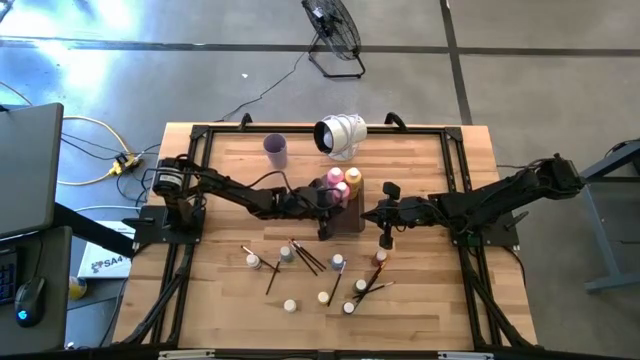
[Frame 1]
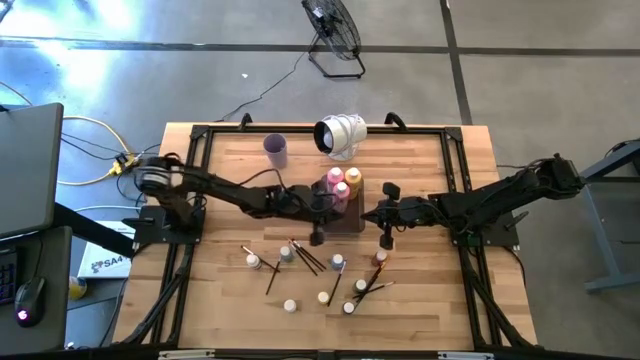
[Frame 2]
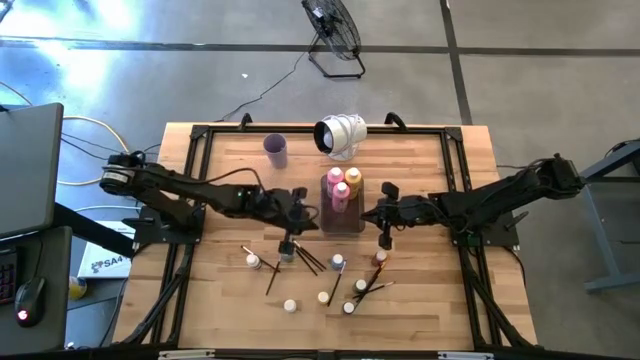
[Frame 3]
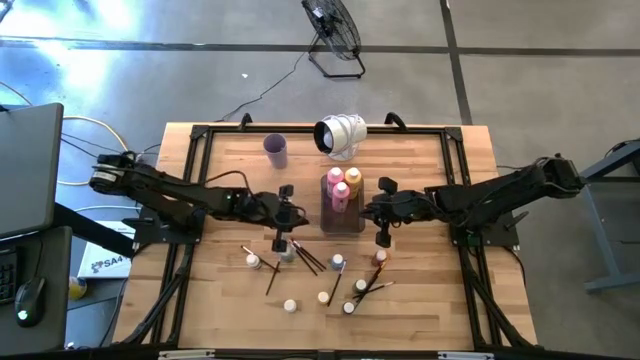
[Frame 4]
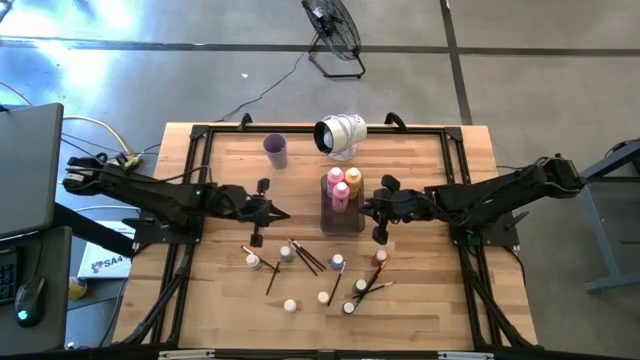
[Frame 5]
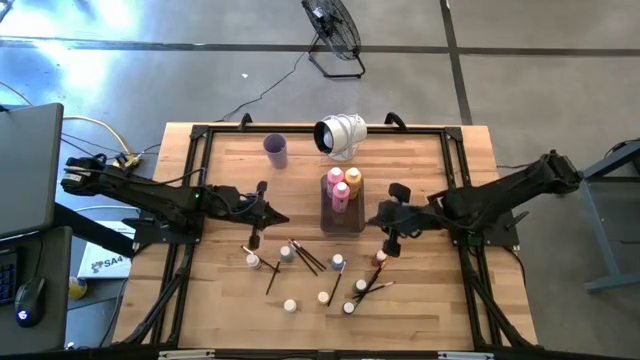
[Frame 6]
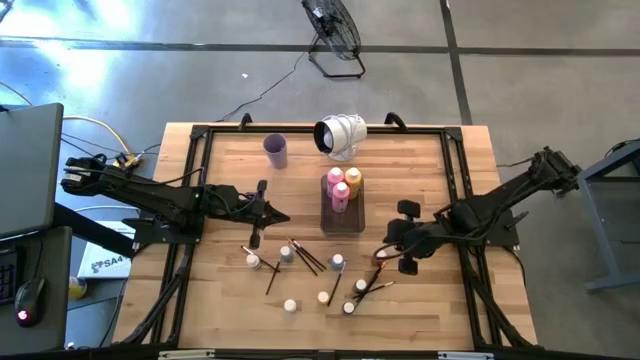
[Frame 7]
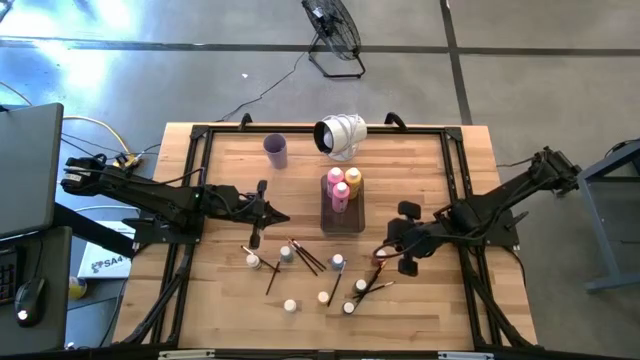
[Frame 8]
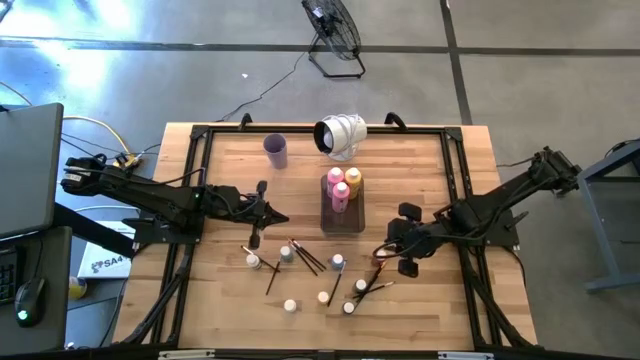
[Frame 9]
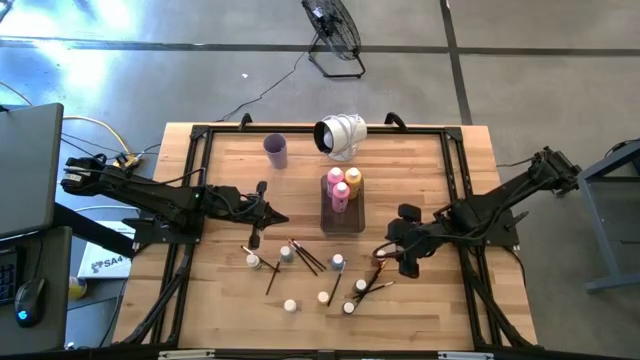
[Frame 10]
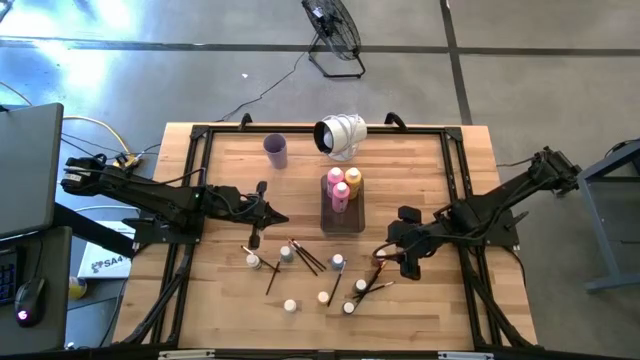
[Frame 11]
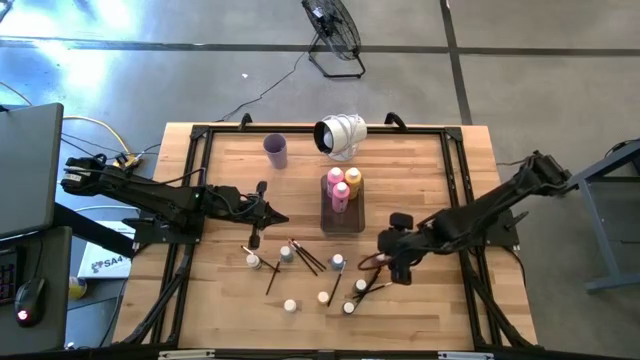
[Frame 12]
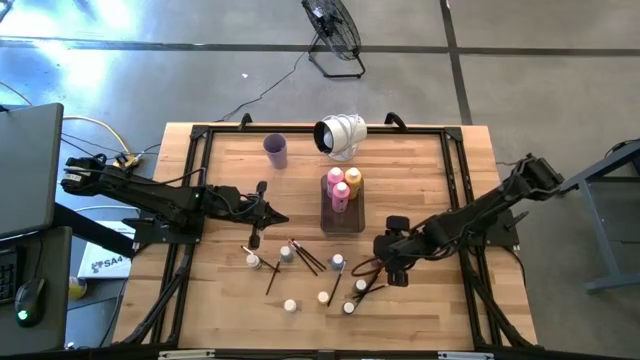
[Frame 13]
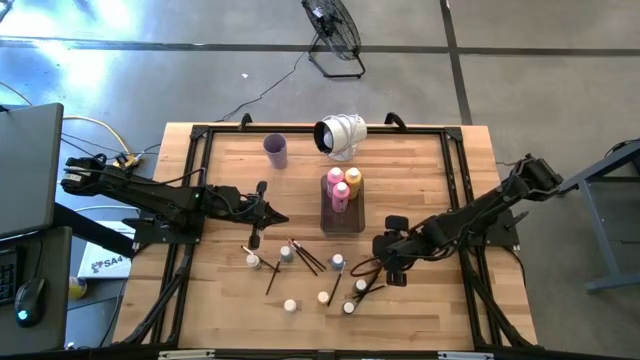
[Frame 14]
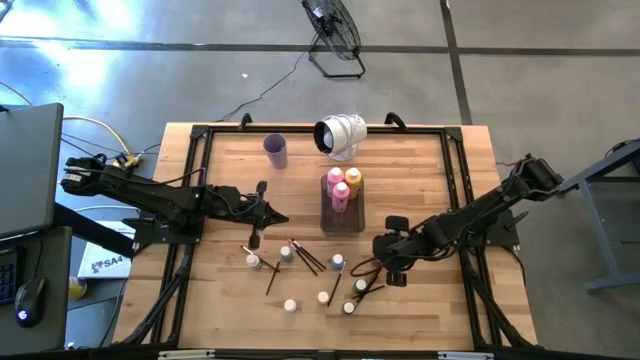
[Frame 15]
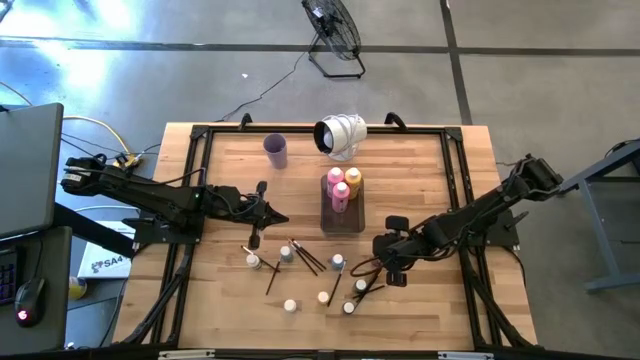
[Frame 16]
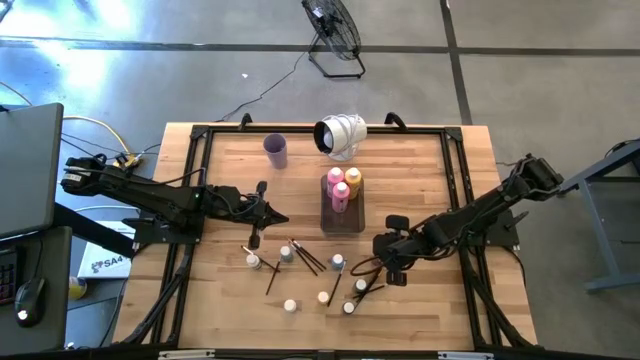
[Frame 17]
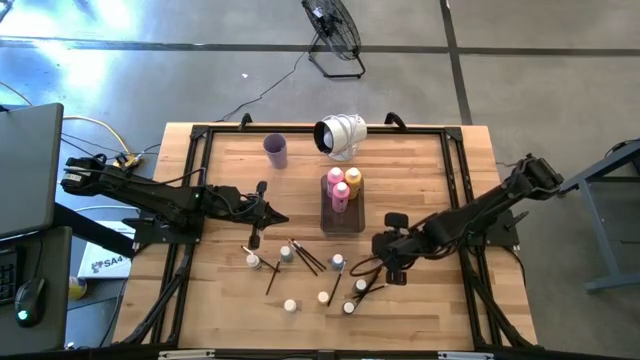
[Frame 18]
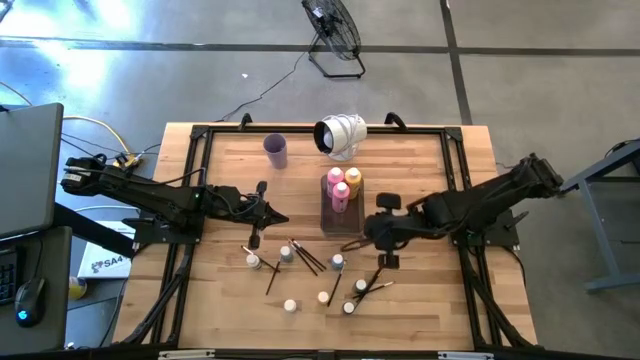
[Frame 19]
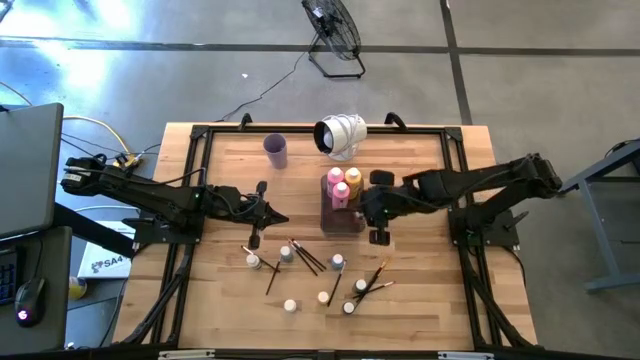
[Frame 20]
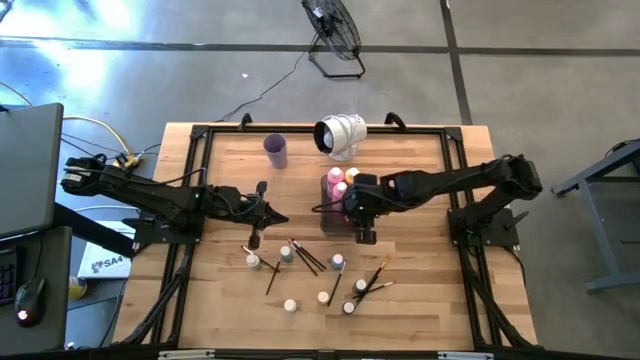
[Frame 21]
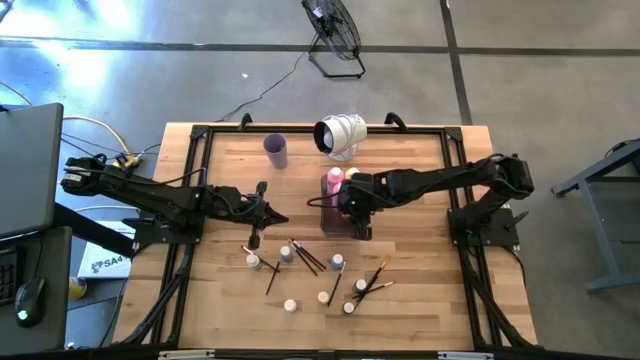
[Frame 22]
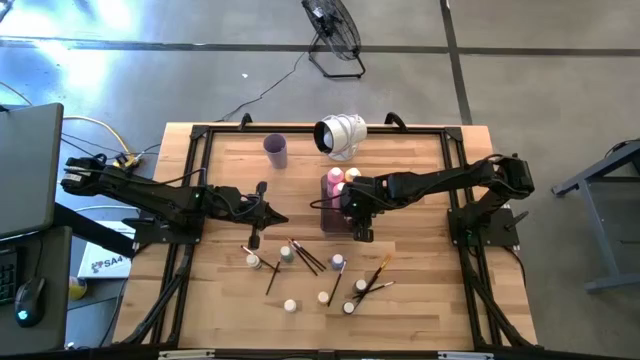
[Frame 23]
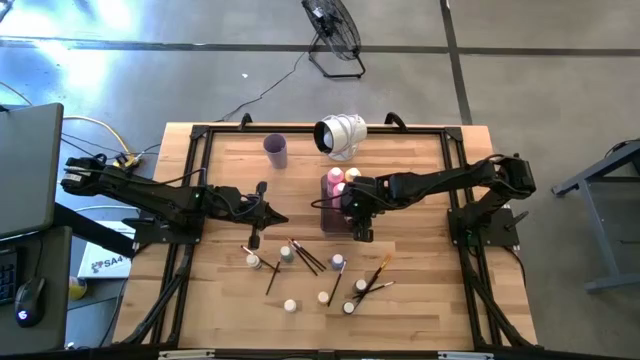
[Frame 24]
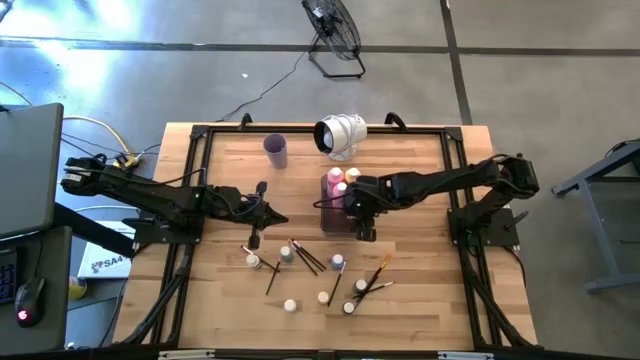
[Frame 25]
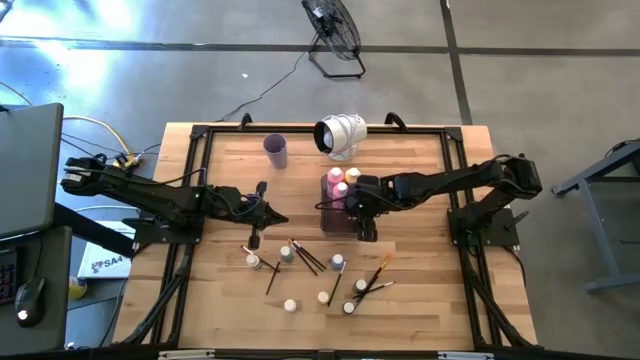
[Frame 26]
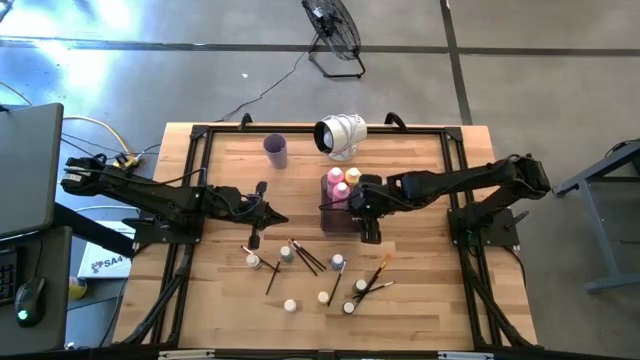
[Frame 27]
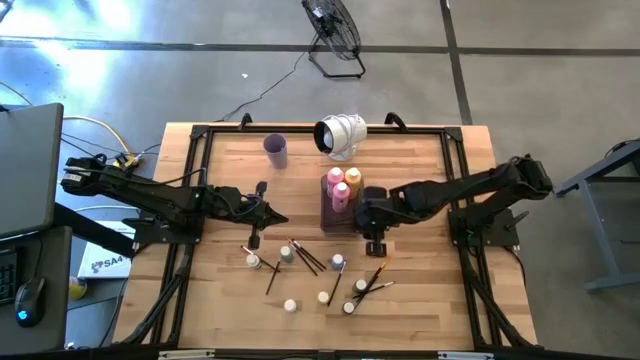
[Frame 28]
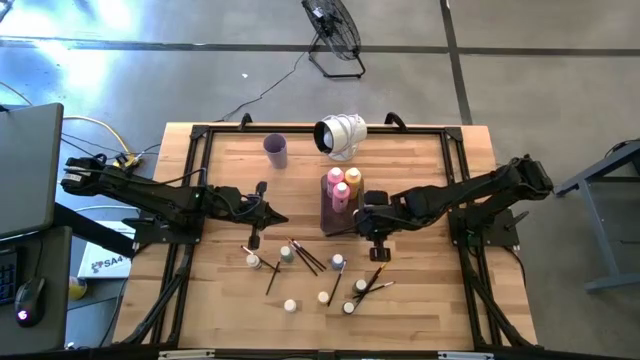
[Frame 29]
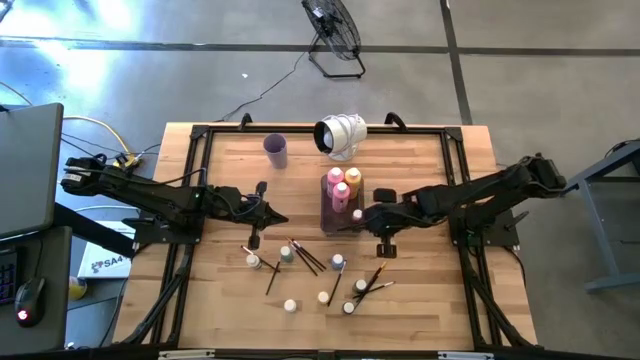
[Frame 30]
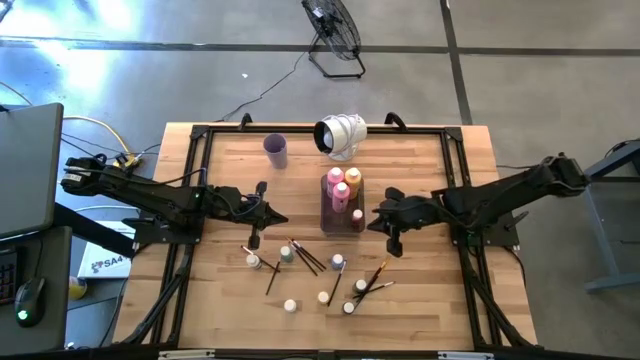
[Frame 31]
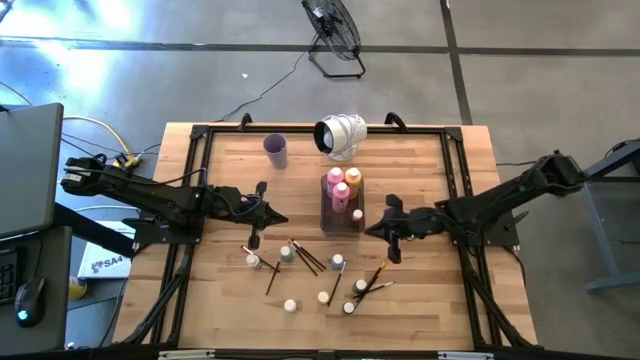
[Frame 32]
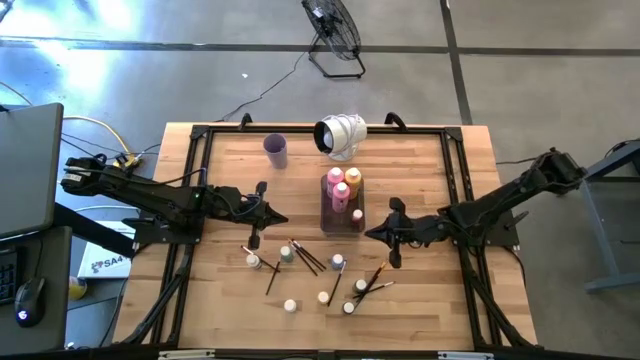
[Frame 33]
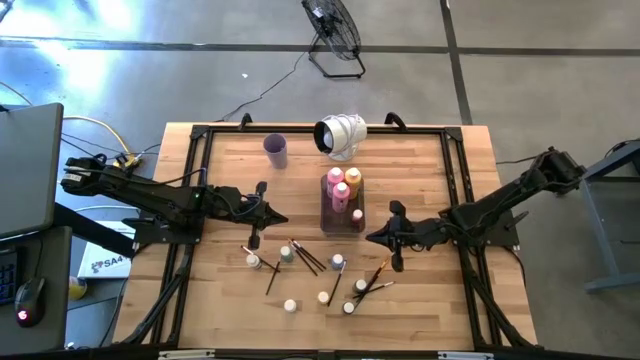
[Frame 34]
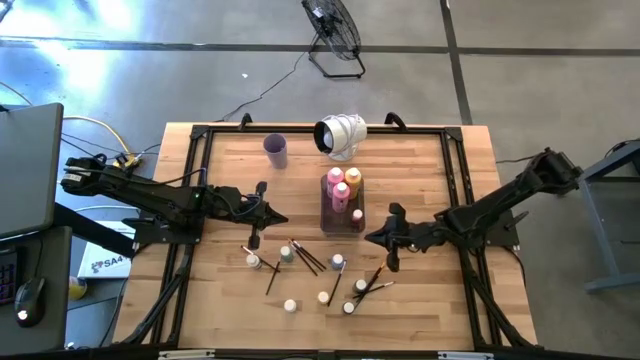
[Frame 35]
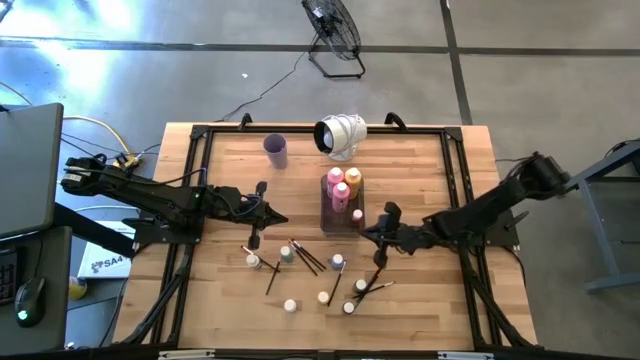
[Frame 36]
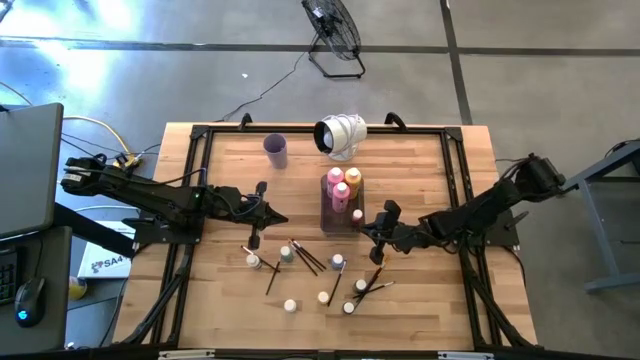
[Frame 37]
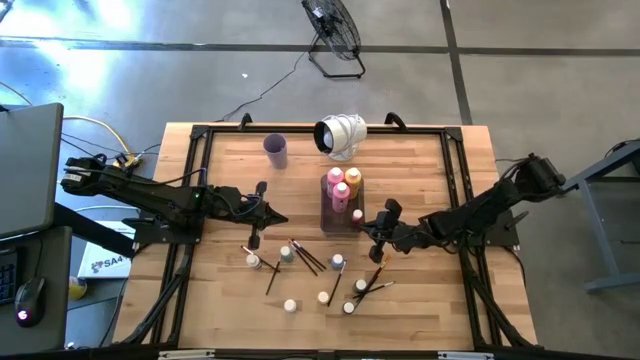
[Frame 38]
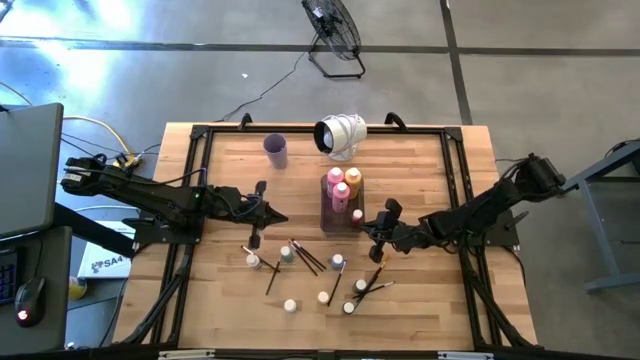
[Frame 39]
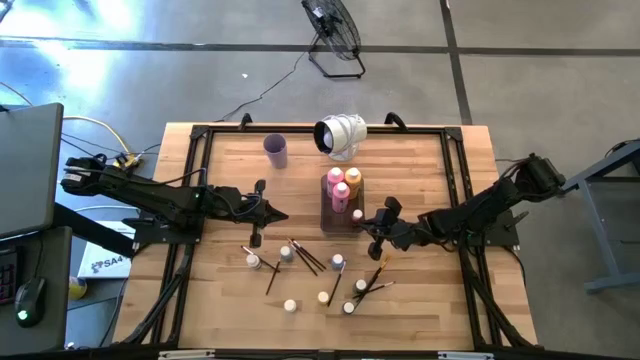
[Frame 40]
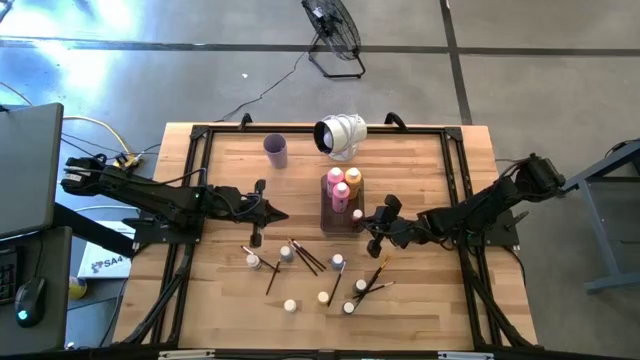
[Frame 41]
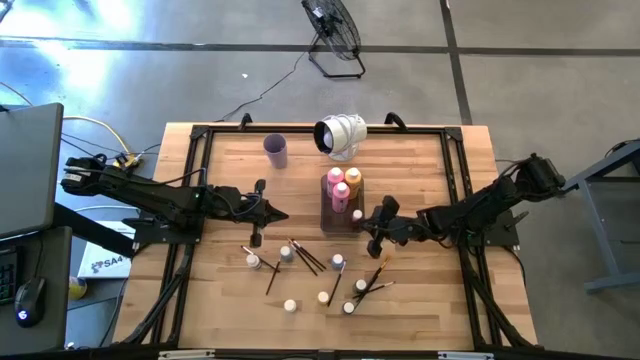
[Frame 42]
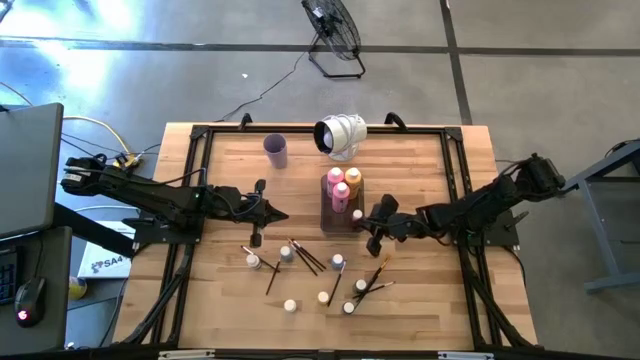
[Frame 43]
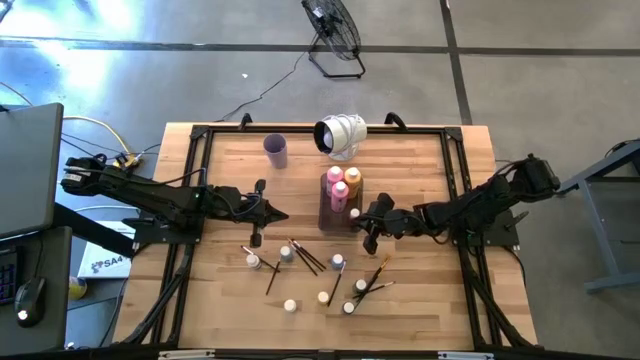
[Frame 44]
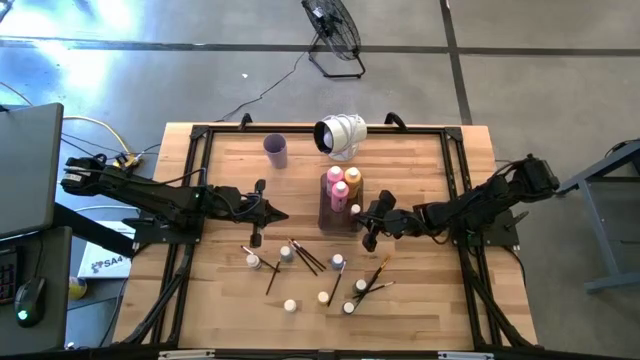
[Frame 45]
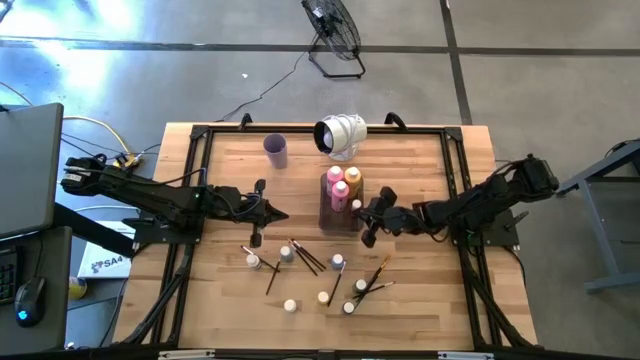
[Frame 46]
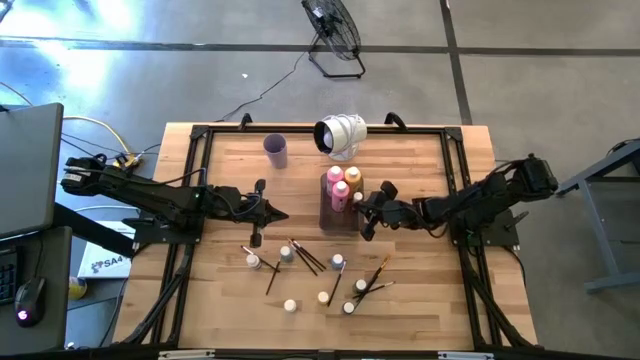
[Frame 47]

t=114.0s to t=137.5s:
Task: Pick & Place Paint Supplies
Put the red paint bottle into the black bin
